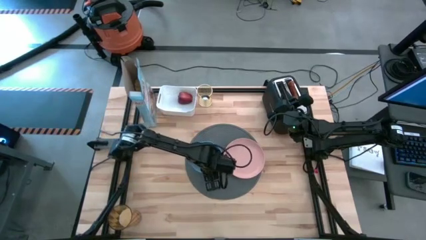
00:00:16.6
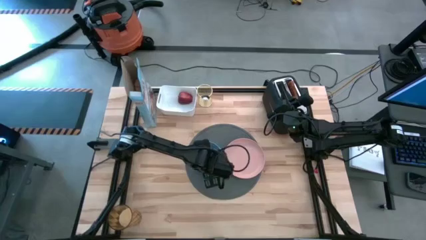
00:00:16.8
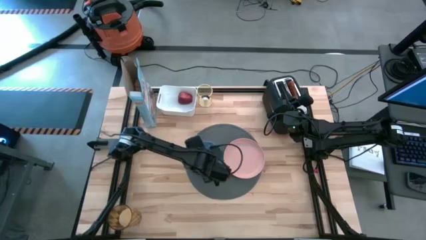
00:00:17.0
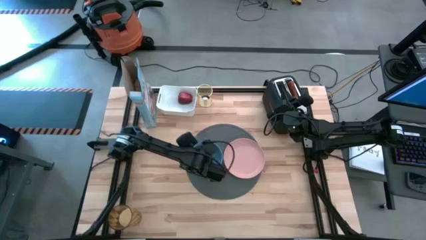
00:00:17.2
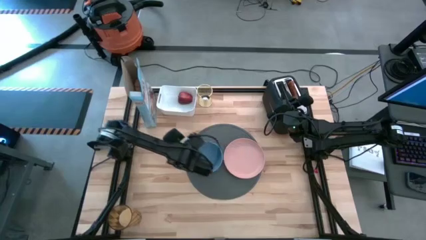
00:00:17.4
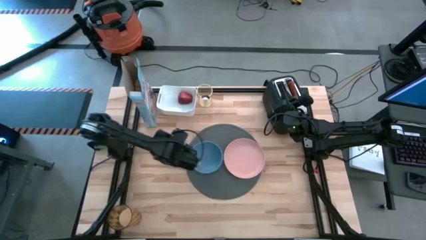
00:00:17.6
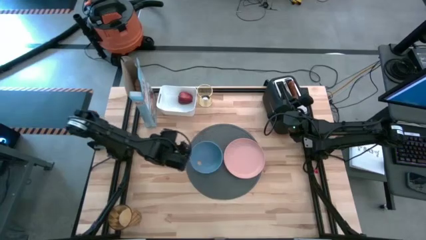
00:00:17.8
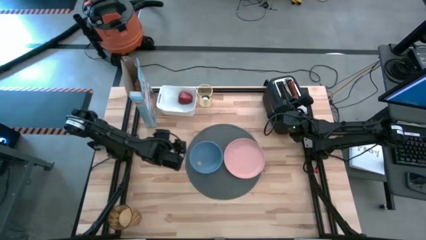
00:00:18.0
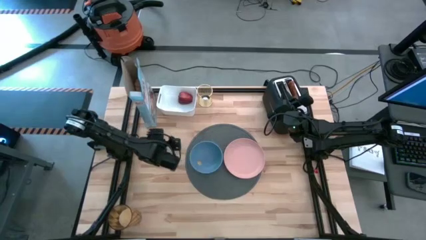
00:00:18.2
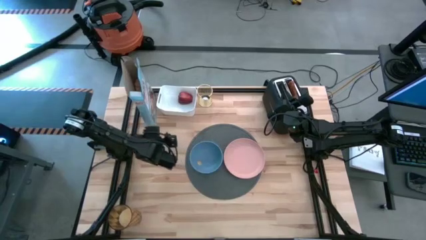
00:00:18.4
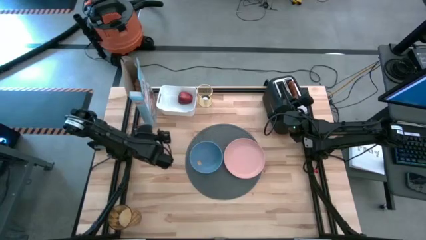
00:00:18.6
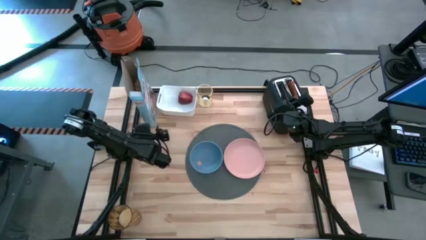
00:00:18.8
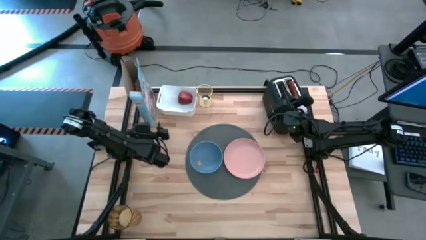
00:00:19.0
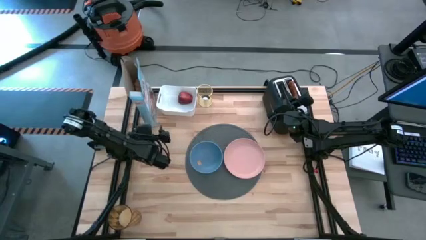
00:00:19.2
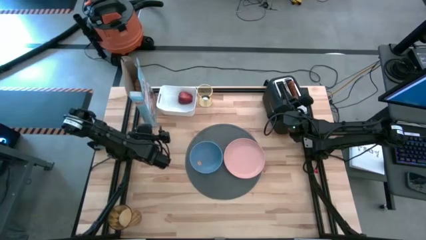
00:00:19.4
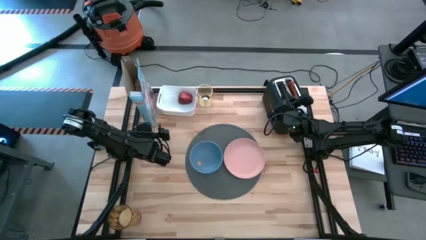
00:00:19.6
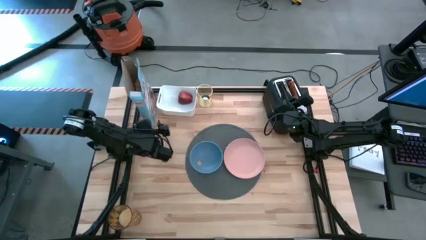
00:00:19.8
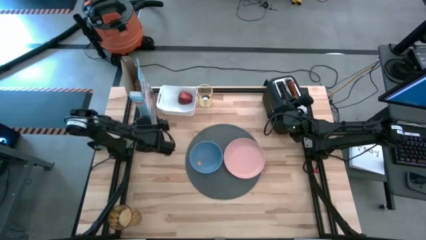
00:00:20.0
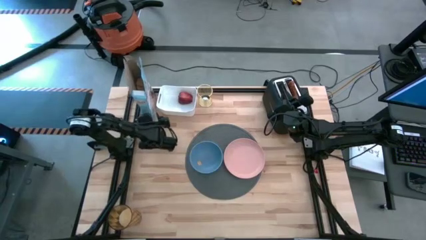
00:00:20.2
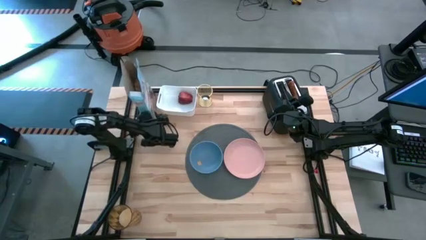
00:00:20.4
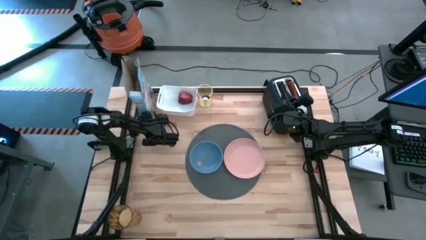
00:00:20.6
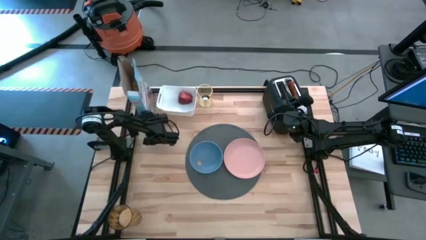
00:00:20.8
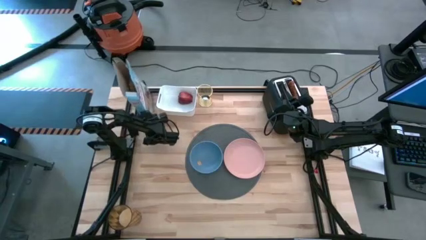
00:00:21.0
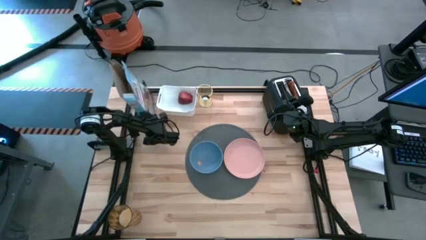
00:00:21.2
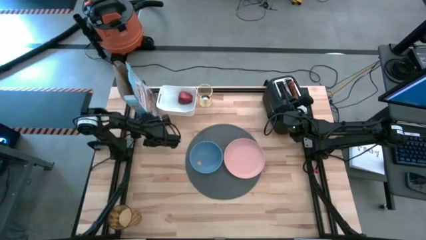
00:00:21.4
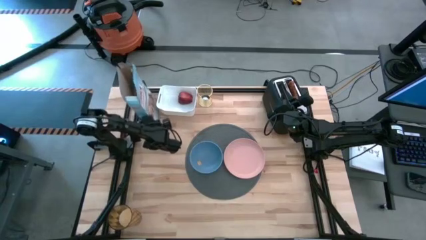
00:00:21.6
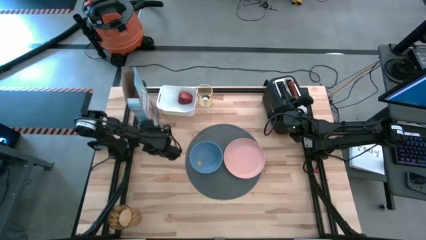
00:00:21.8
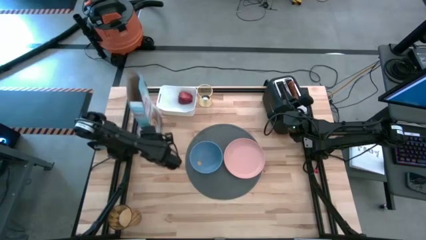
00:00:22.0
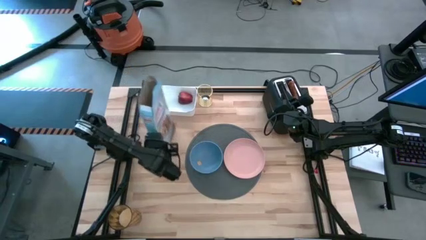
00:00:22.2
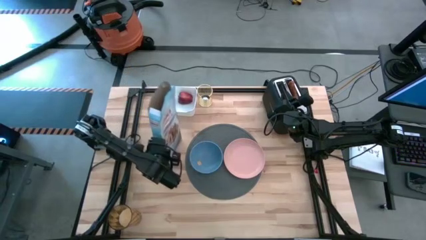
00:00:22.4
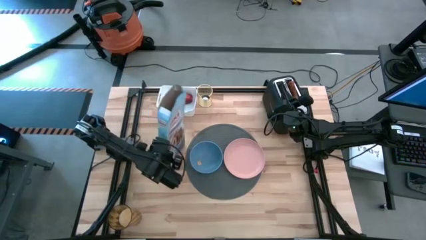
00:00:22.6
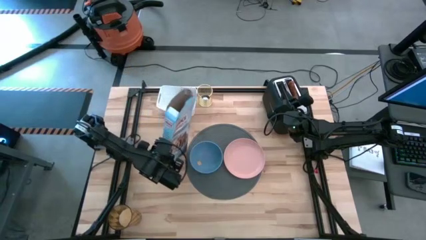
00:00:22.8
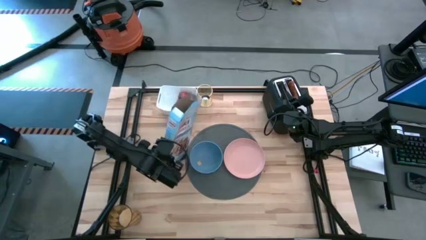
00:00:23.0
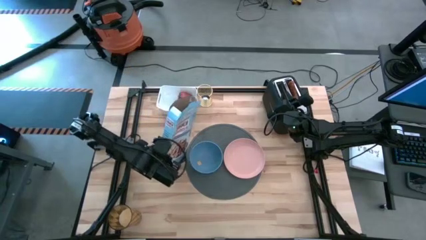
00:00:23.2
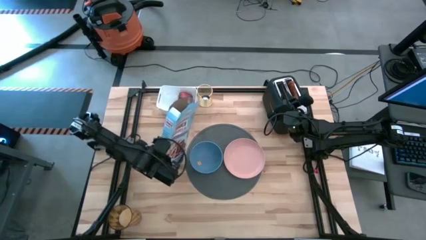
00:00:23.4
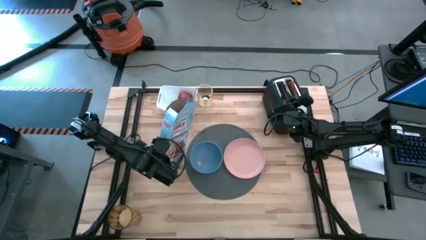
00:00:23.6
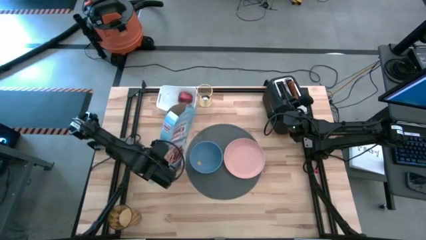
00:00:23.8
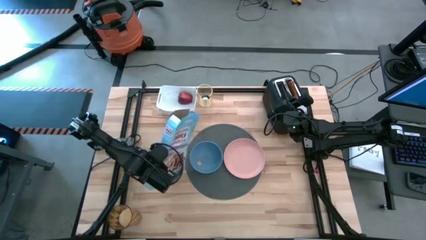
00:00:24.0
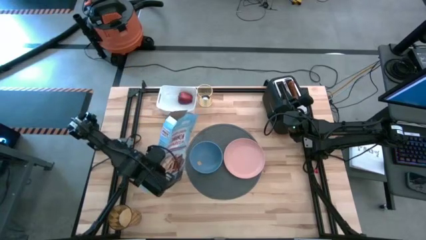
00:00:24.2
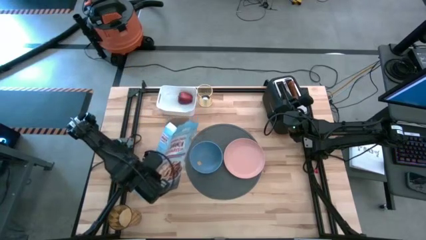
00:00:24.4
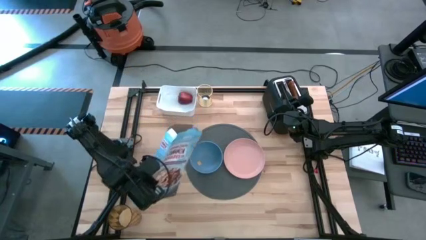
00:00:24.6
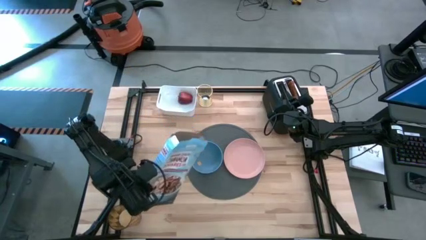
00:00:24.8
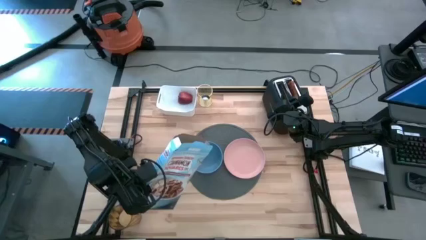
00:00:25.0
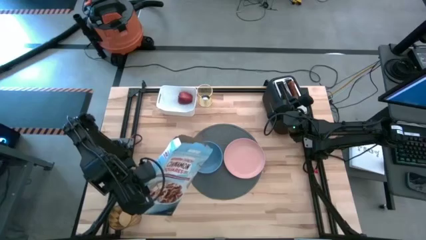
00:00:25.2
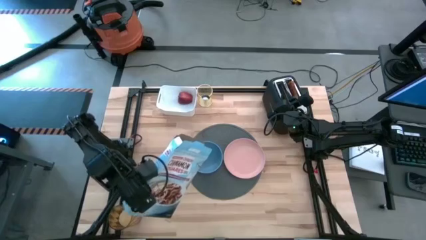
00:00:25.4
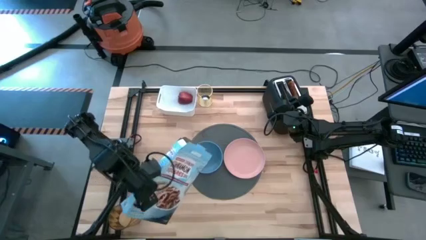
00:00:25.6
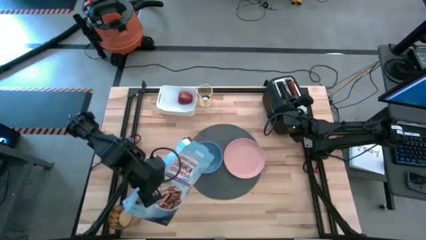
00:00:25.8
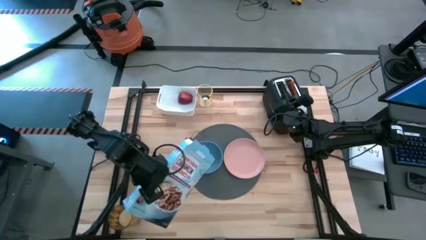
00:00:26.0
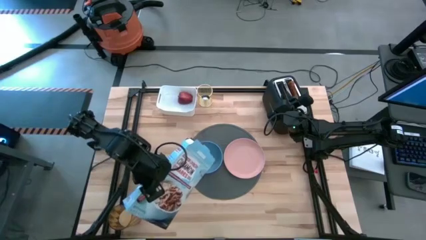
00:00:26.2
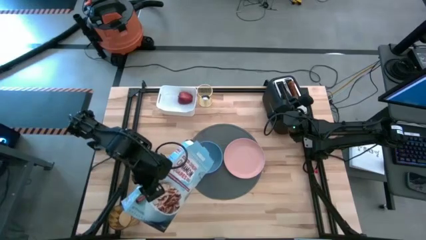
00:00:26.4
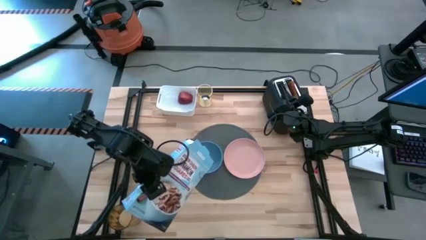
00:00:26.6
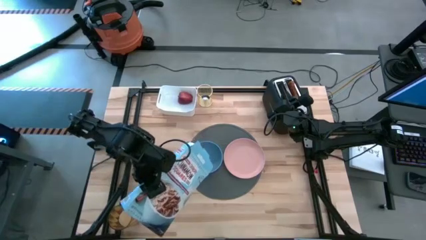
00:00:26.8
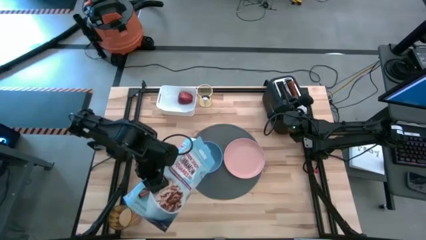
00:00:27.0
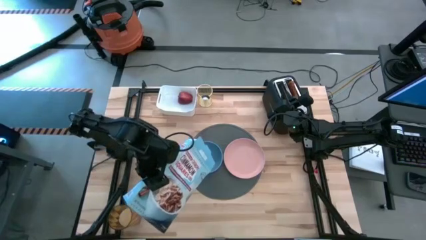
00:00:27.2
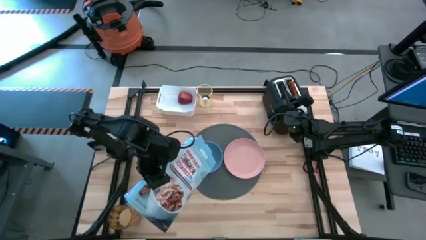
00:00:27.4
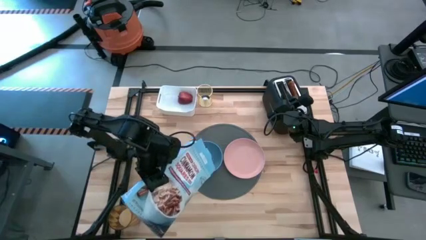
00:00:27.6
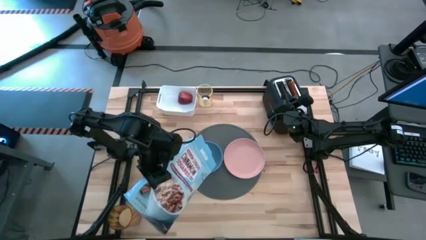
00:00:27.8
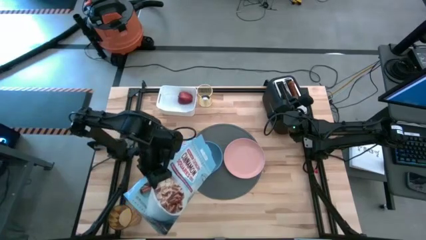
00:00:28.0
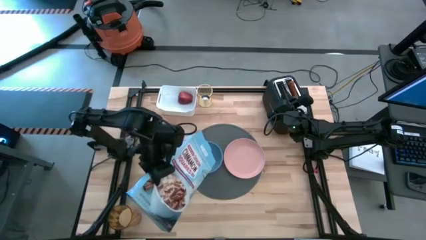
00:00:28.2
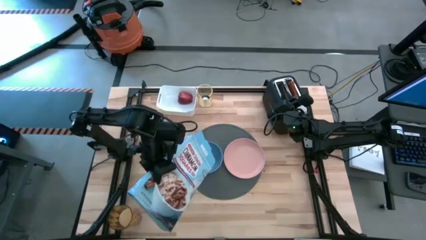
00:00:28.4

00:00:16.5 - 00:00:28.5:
Task: Arrange a breakfast setting
Pour the cereal from the blue cereal box into the blue bowl on the gray mat
